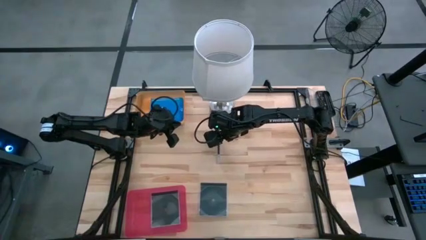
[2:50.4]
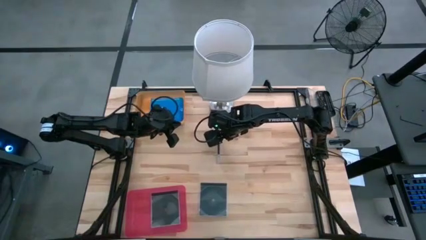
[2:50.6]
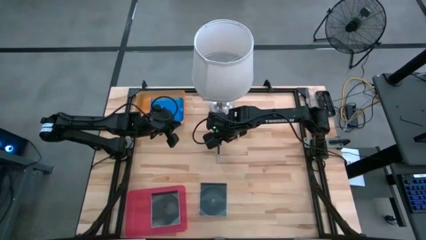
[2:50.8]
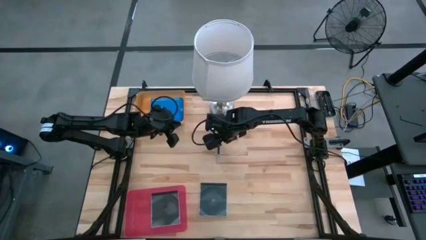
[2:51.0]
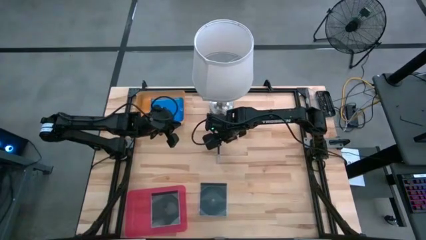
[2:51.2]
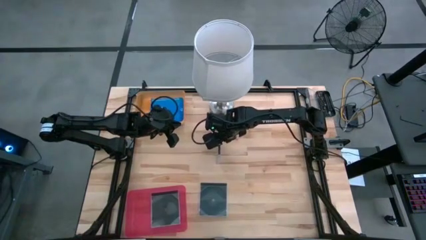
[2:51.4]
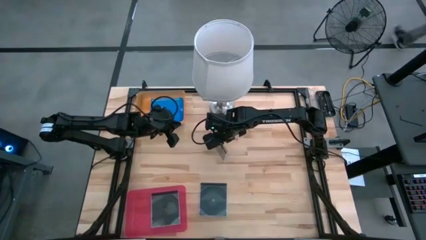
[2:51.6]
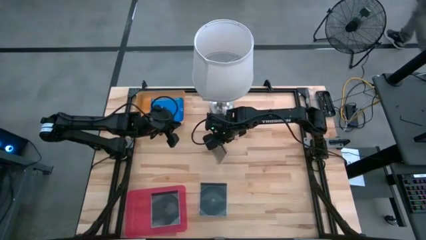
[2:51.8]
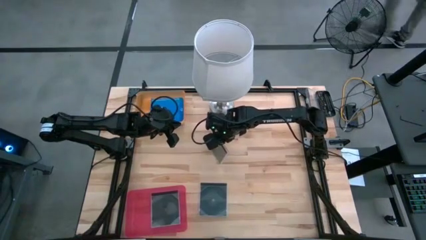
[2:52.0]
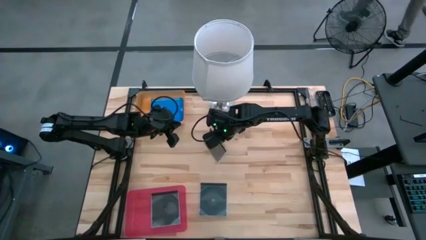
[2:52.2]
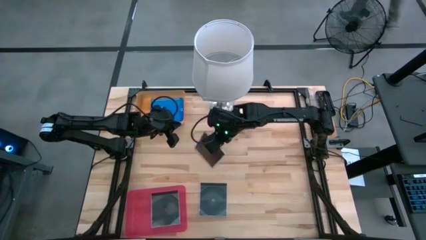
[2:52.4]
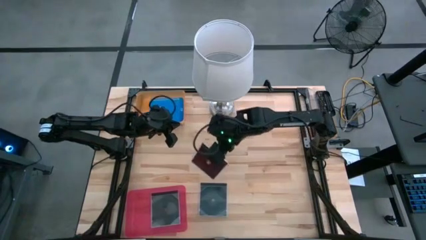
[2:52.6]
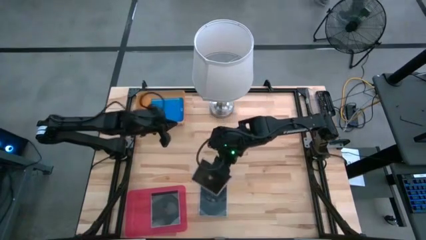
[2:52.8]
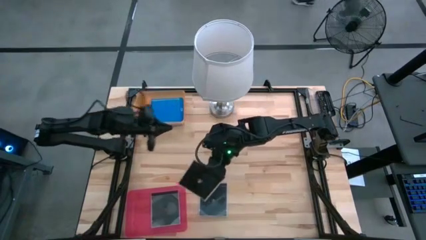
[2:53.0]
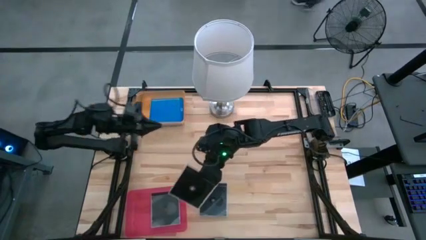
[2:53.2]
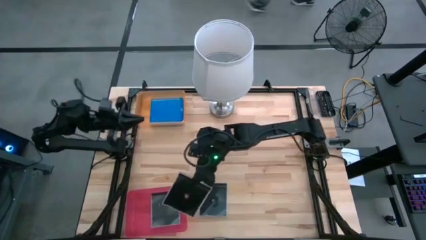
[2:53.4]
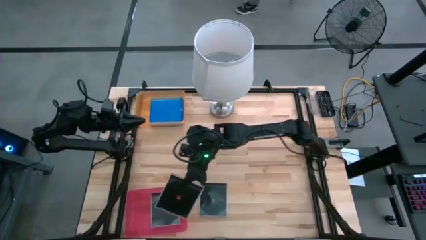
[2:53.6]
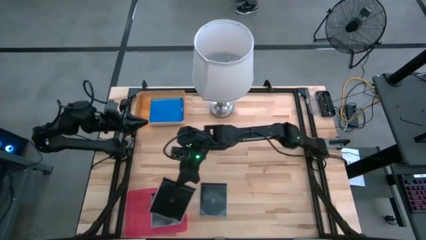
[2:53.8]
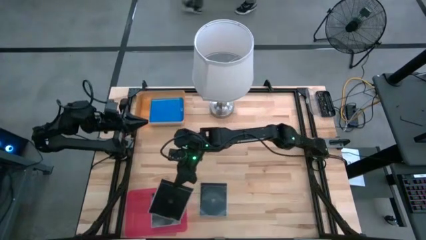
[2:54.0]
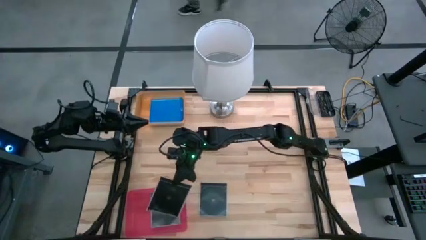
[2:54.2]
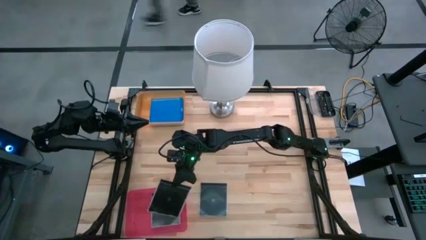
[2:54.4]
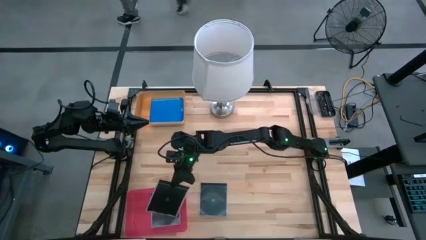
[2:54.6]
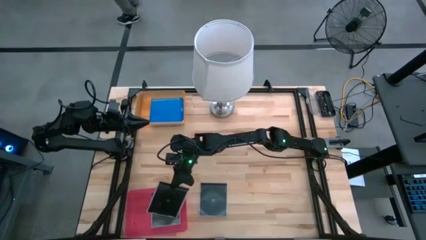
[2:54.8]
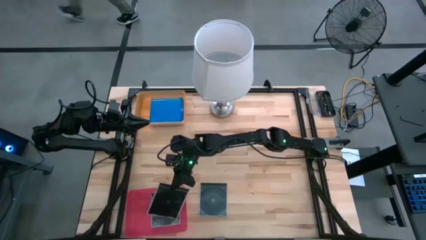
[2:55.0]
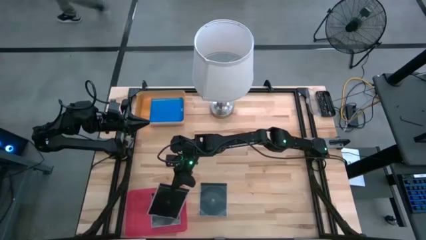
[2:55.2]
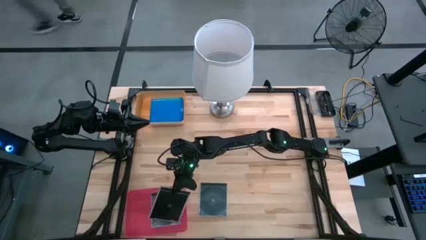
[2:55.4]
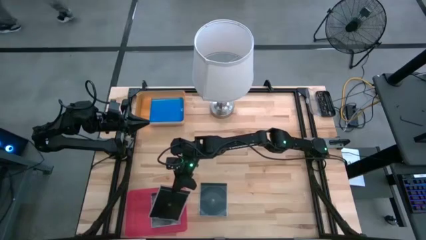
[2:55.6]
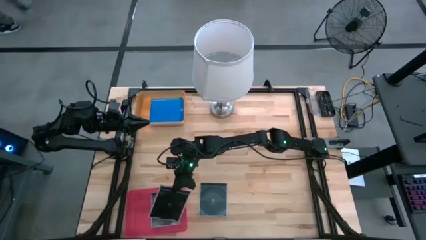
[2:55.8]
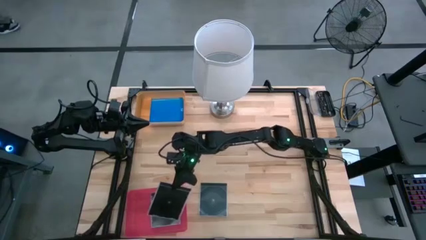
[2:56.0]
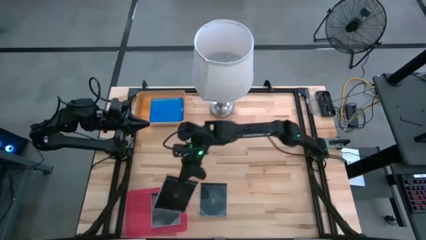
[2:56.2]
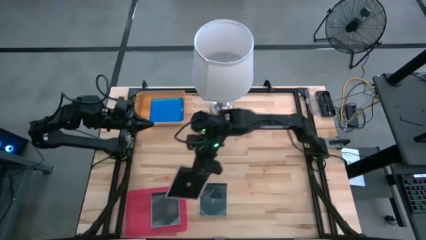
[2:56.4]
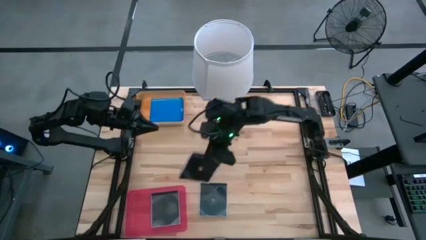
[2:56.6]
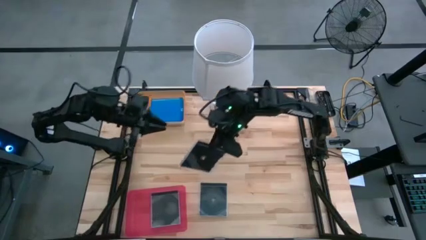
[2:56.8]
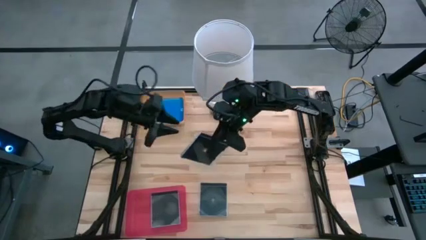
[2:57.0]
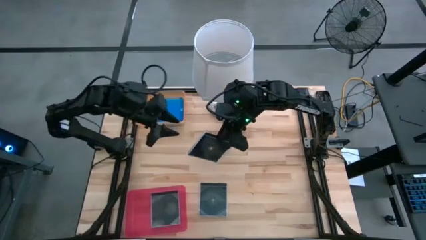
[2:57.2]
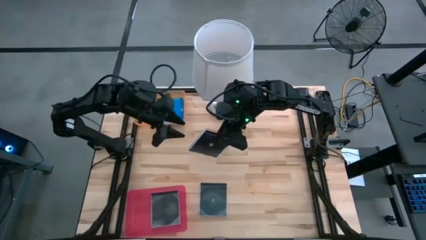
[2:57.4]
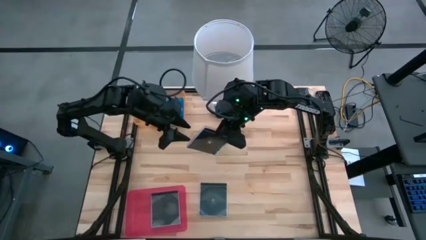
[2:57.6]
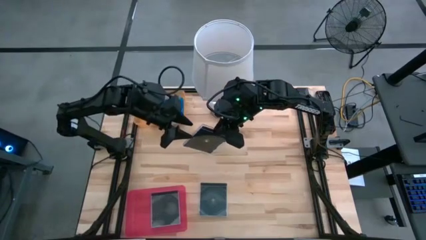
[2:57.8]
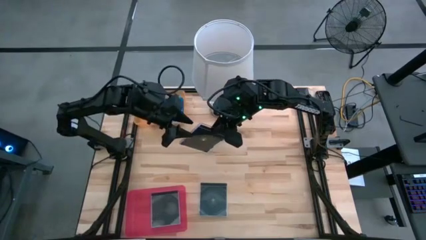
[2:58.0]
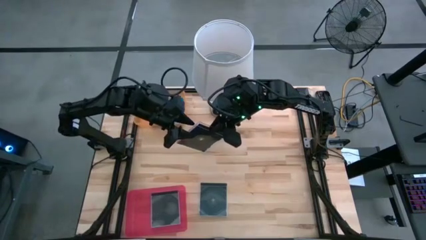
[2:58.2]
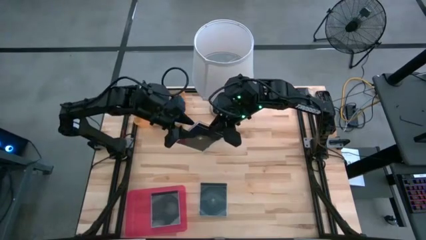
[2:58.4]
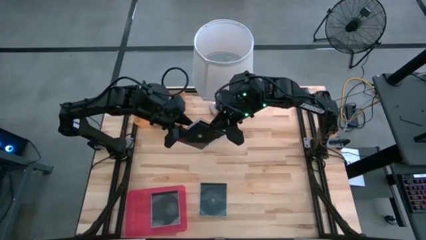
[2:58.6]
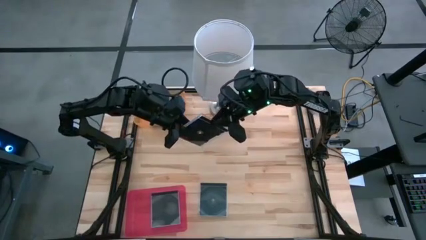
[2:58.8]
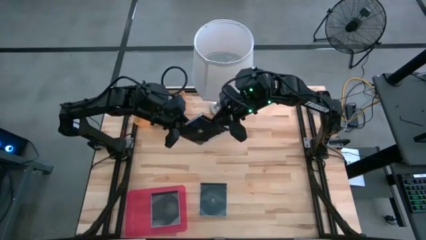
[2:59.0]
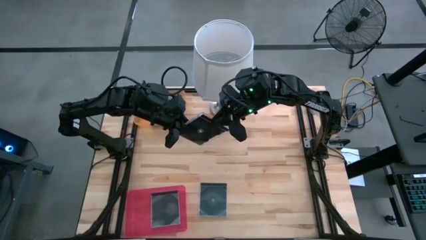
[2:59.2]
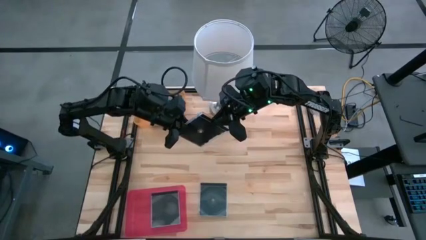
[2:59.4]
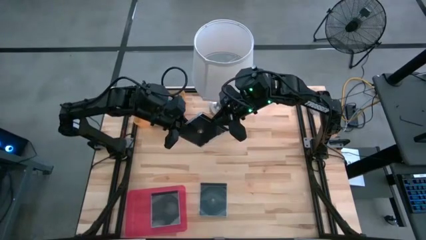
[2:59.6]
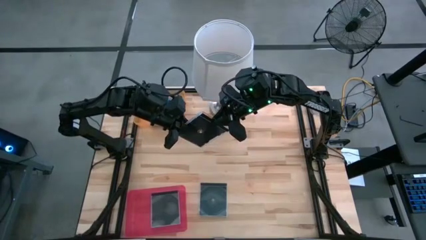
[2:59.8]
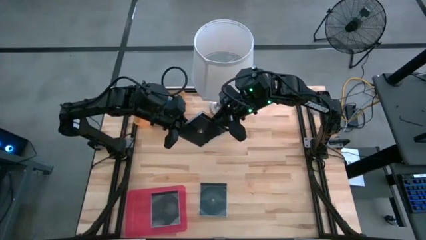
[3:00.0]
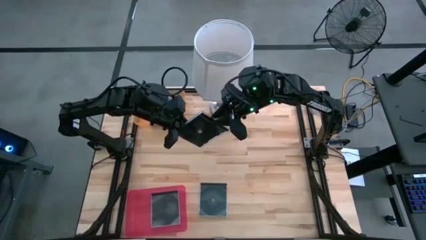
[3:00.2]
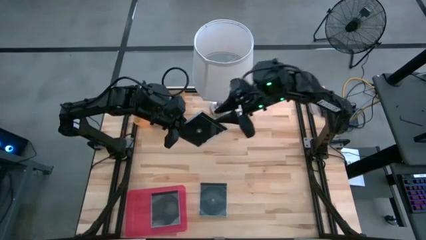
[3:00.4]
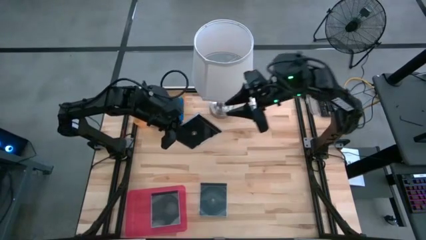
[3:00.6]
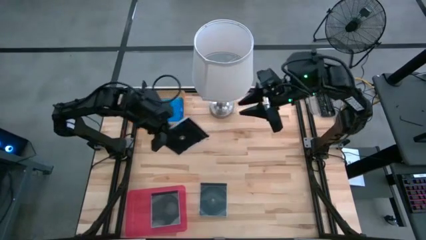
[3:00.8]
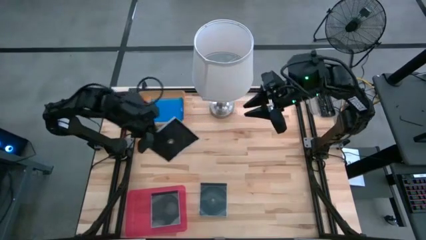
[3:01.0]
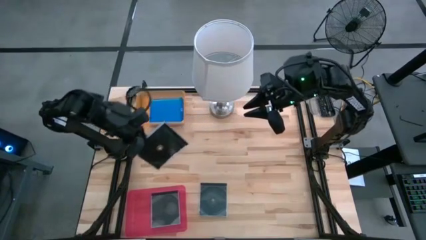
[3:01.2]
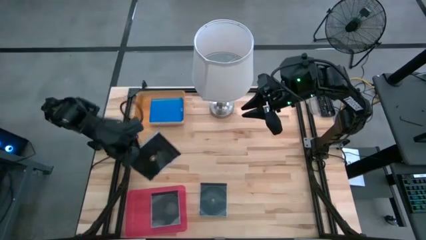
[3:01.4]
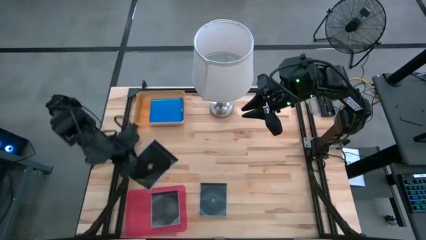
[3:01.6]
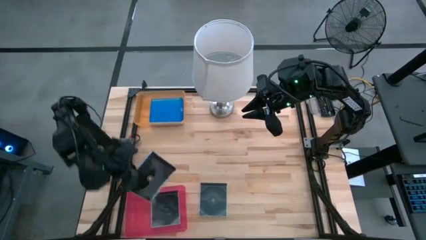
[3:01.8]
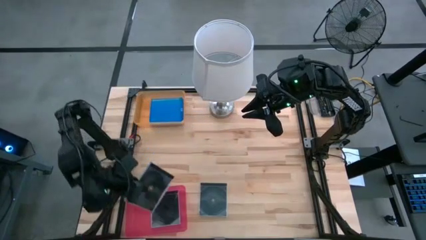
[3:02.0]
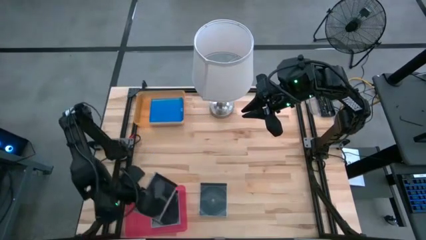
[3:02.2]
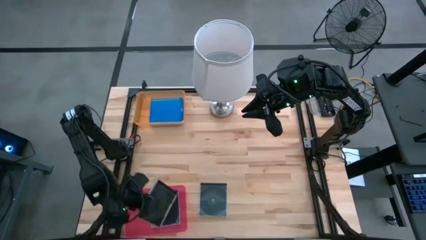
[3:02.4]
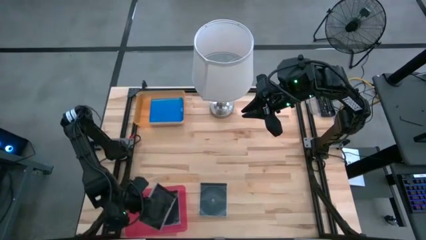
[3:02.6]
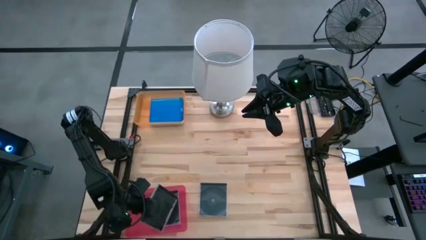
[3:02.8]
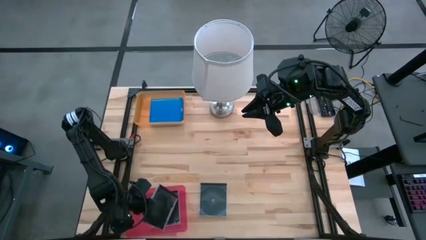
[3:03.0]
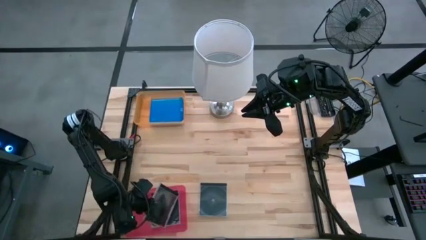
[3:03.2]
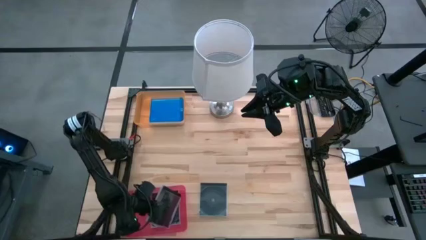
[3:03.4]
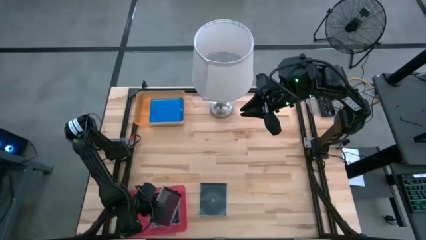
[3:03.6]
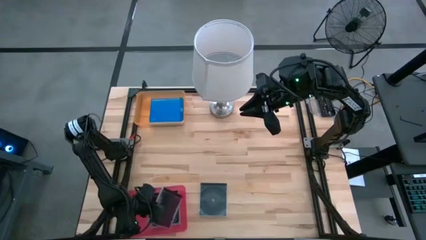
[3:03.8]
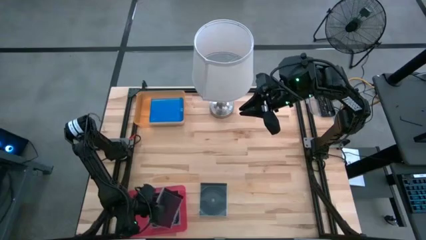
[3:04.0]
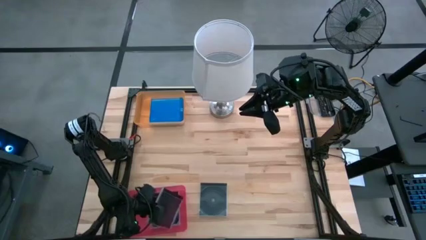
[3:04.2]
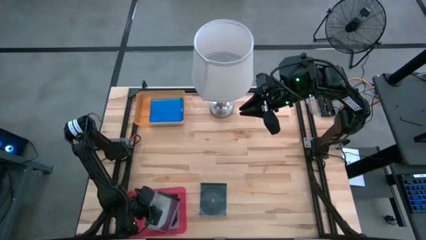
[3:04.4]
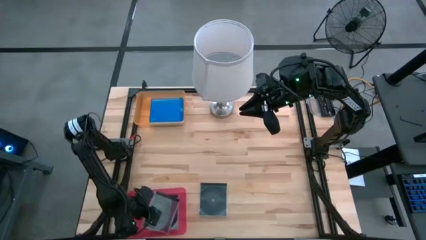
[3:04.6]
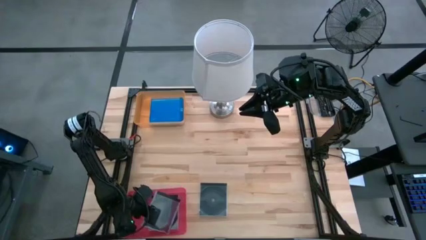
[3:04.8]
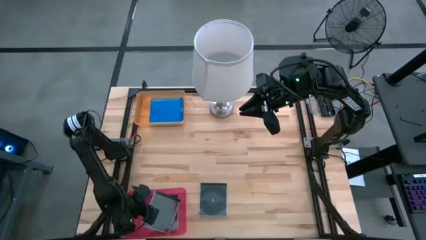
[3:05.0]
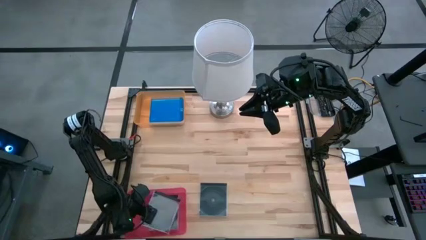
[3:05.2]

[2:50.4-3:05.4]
Task: Pick & place jewel cases by type
Put the top black cd case into the pink bin
